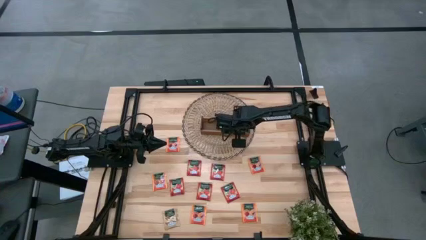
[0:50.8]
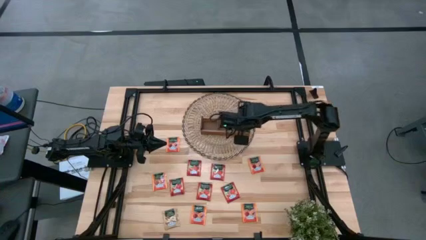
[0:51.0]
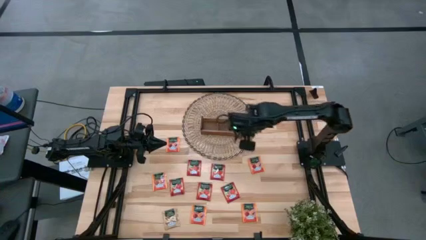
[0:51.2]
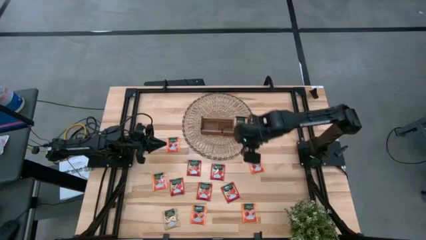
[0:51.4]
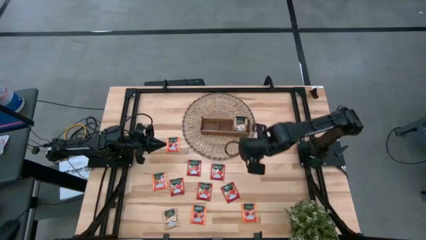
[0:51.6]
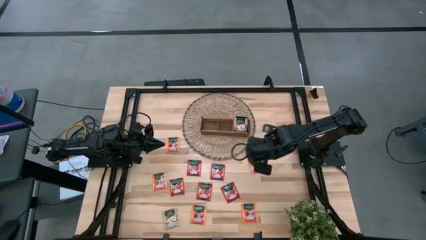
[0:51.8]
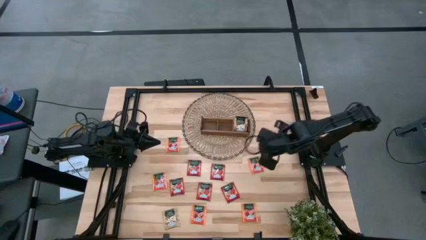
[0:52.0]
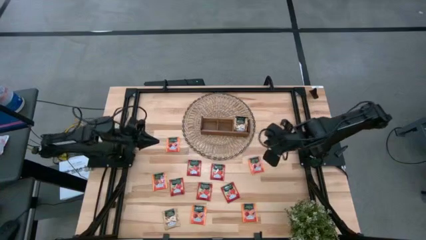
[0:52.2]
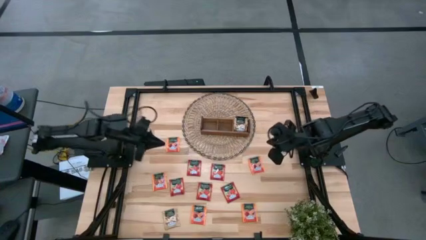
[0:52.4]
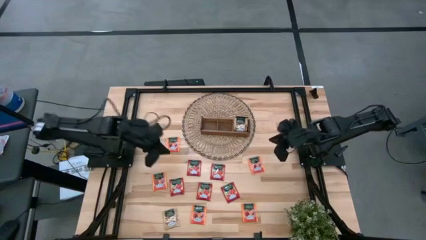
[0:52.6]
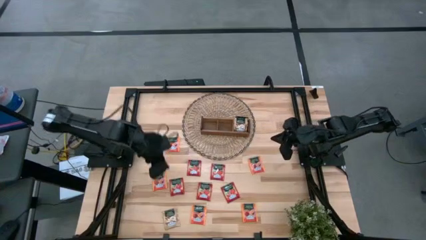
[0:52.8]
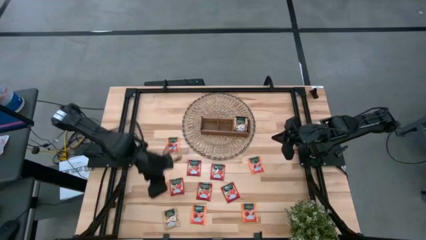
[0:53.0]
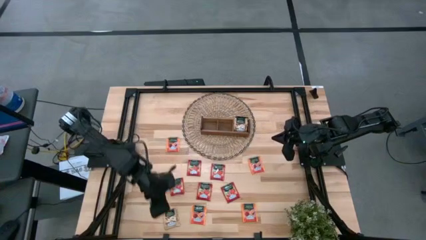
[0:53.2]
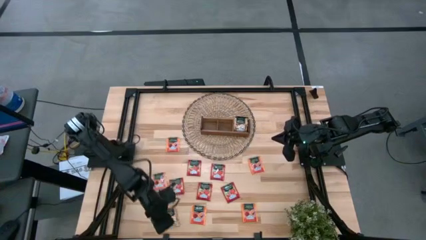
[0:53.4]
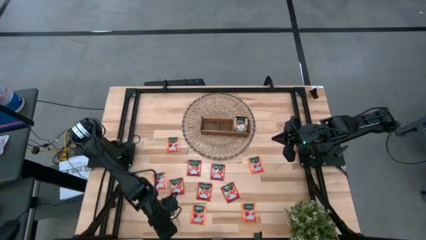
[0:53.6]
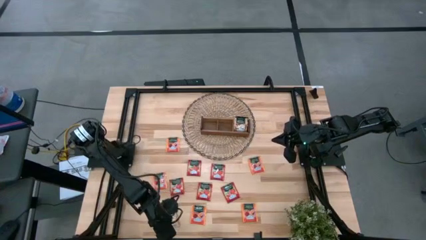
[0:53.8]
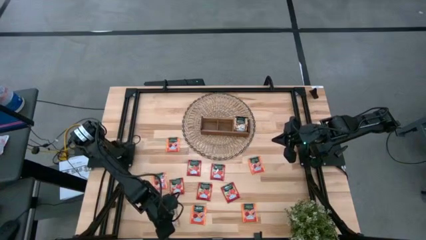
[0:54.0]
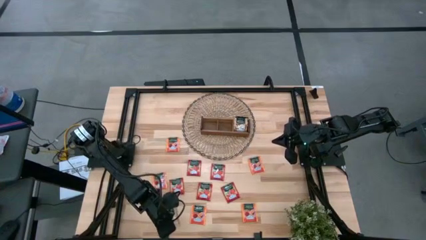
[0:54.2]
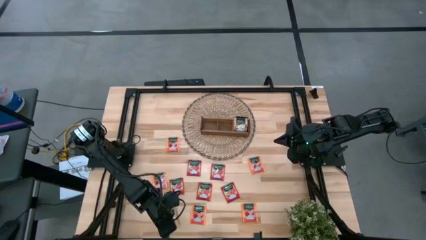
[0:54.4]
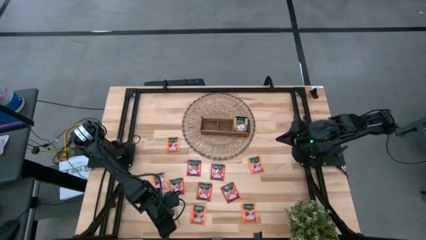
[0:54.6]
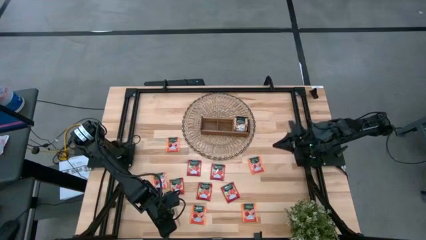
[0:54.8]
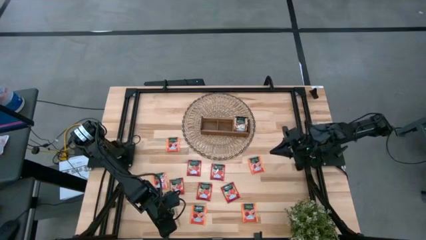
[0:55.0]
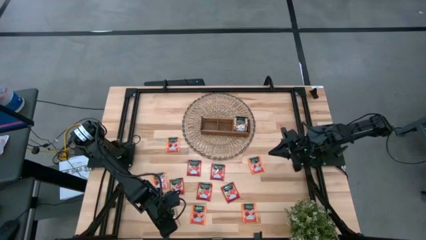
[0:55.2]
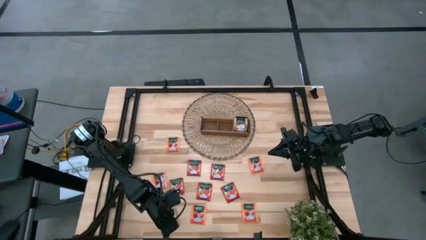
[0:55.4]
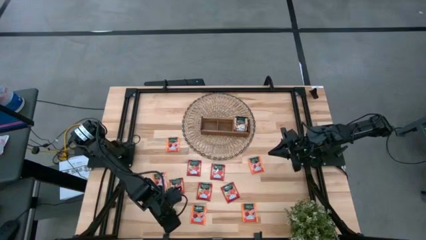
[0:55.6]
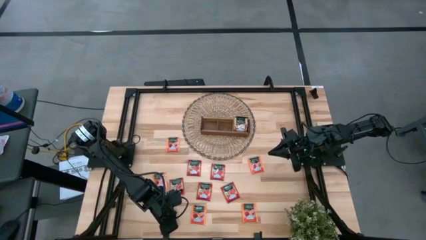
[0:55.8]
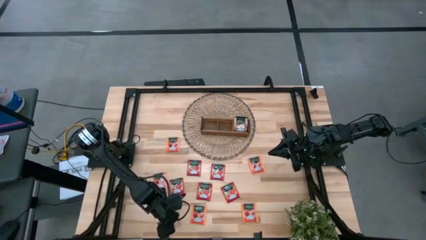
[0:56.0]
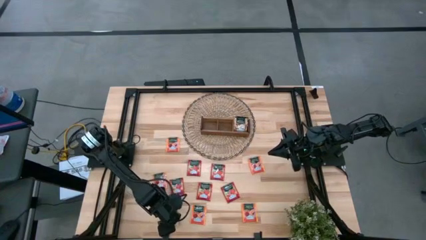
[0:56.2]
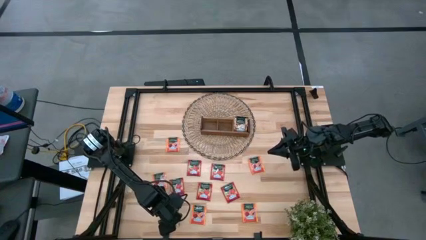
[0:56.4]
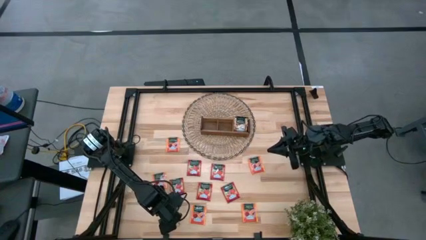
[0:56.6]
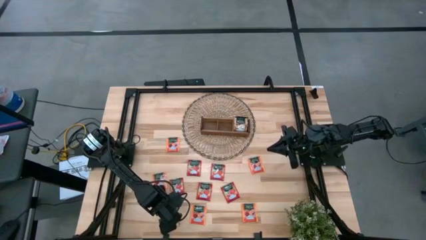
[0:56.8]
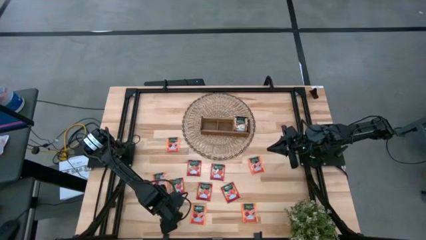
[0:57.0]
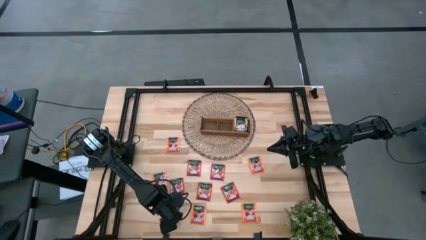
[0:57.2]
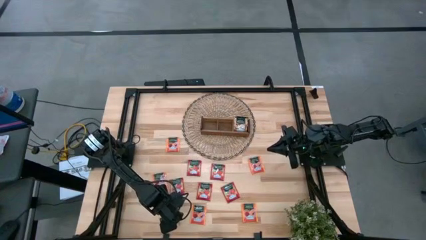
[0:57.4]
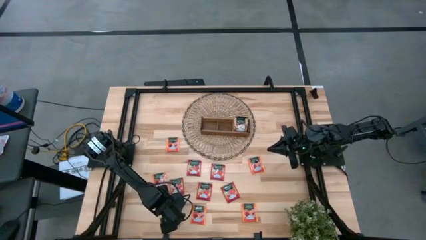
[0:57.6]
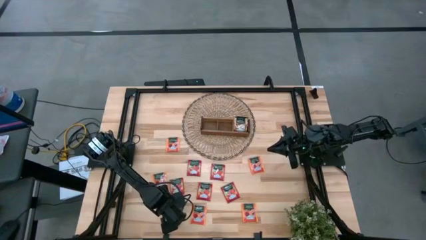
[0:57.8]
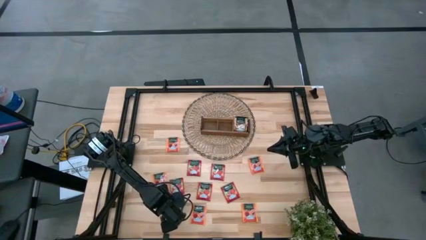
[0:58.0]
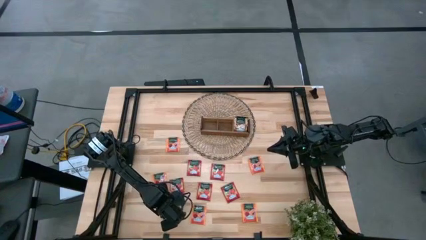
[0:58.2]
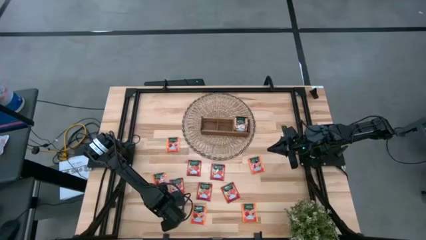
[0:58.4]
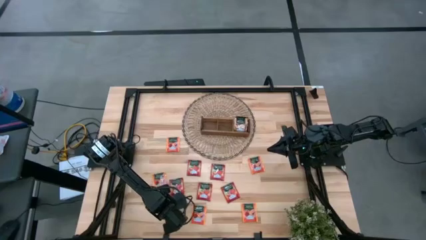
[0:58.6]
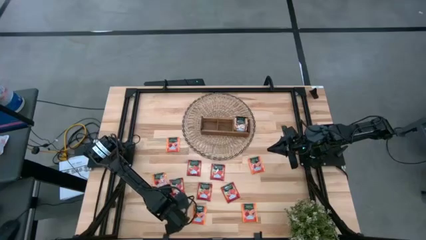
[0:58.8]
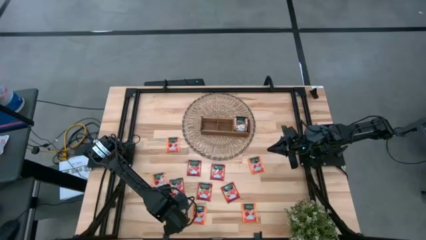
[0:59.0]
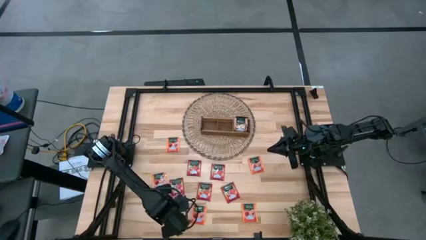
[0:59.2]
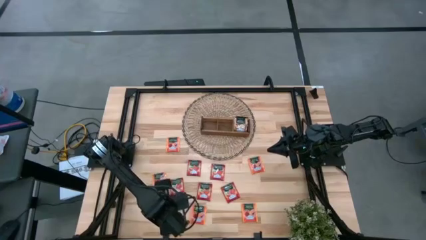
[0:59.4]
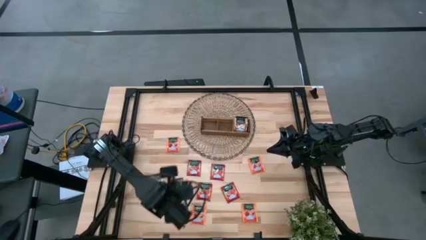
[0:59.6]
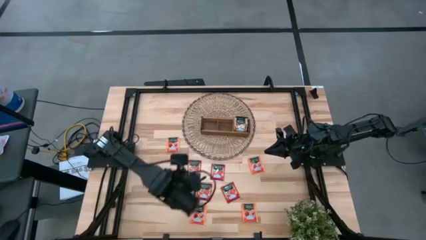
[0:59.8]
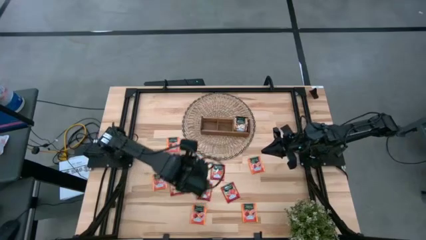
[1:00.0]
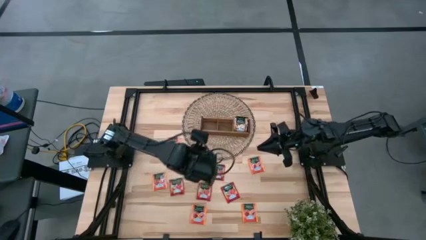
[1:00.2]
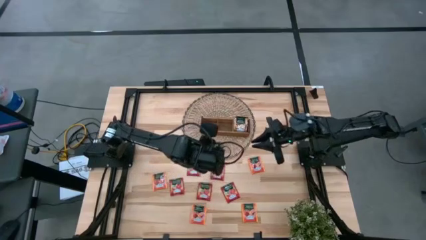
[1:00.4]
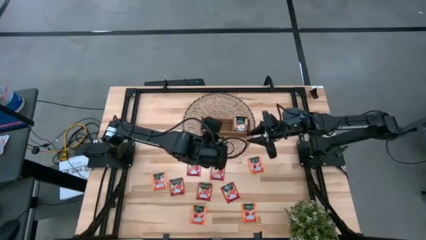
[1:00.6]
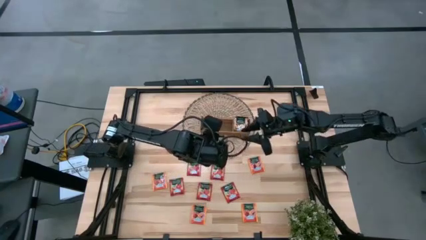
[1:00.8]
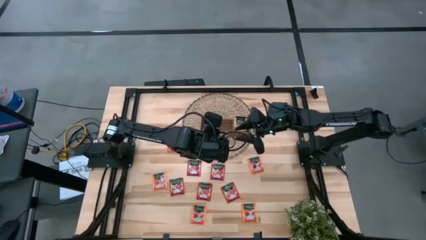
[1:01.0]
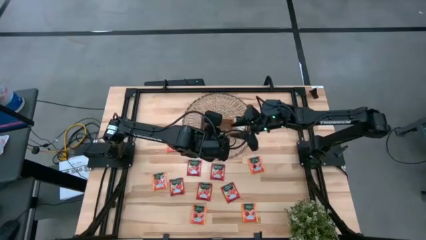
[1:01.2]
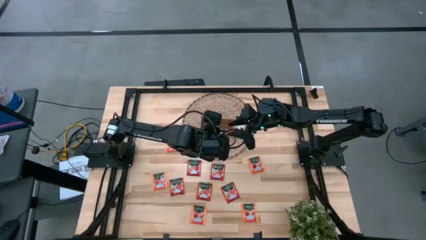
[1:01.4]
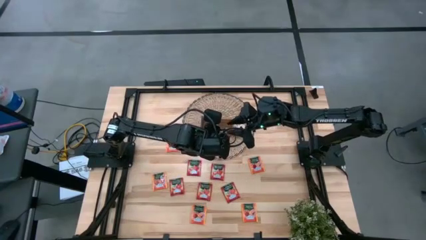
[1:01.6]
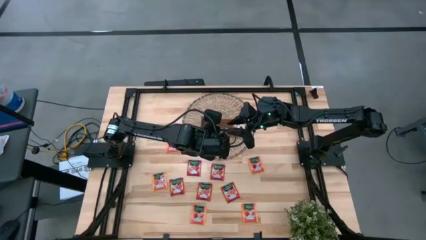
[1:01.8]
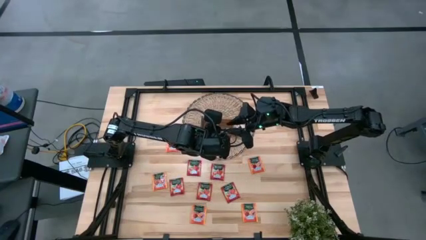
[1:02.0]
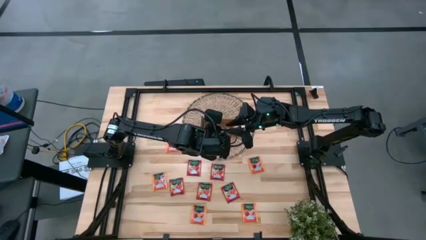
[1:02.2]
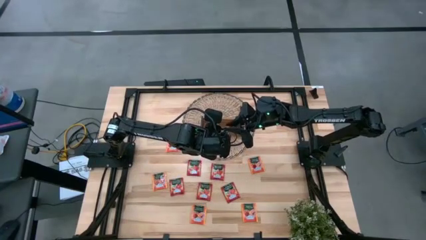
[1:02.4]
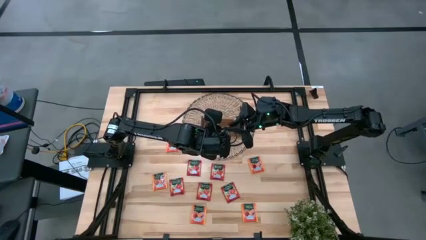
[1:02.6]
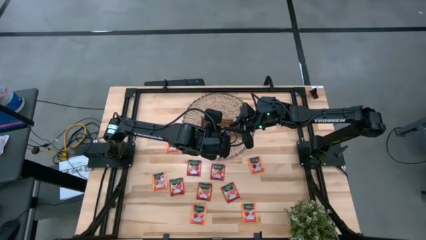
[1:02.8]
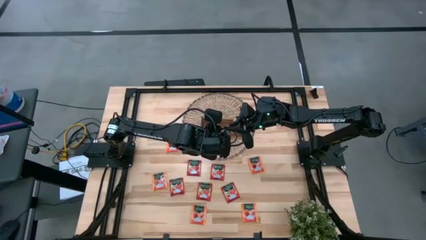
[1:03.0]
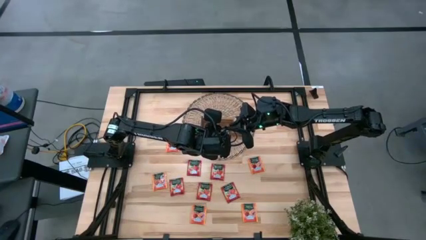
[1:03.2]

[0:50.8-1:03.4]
Task: Pick & Place Tea
Put the brown tea bag into the right slot of the wooden organizer
